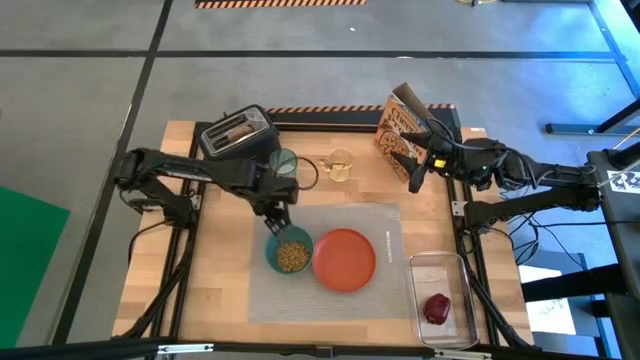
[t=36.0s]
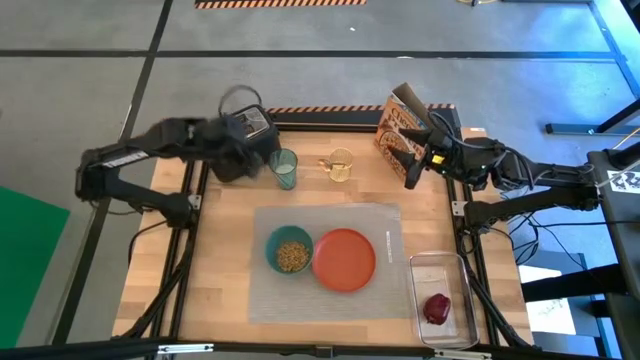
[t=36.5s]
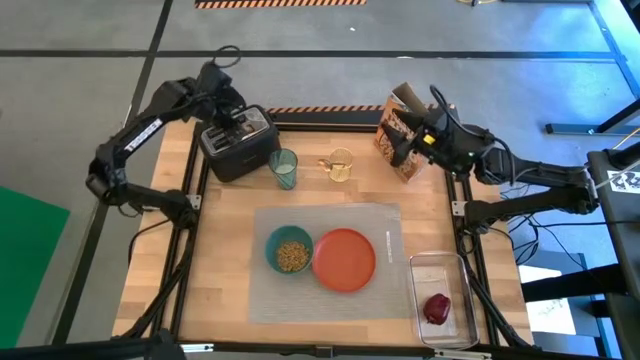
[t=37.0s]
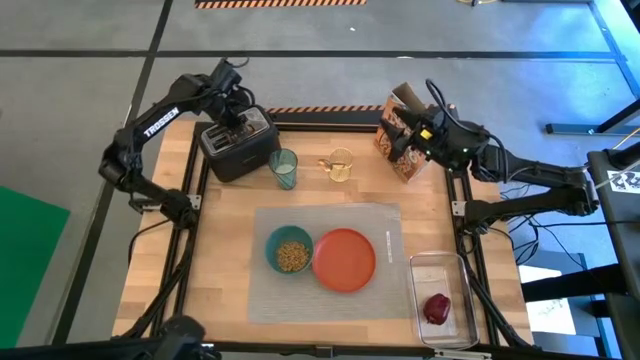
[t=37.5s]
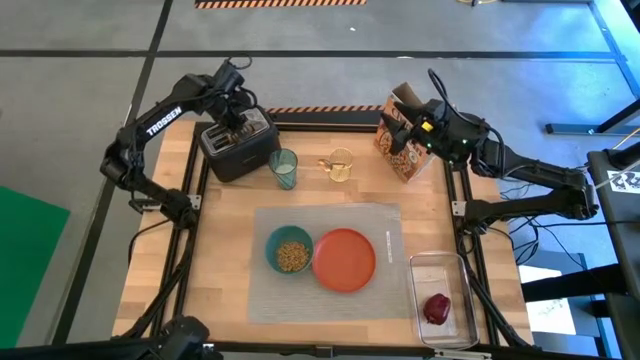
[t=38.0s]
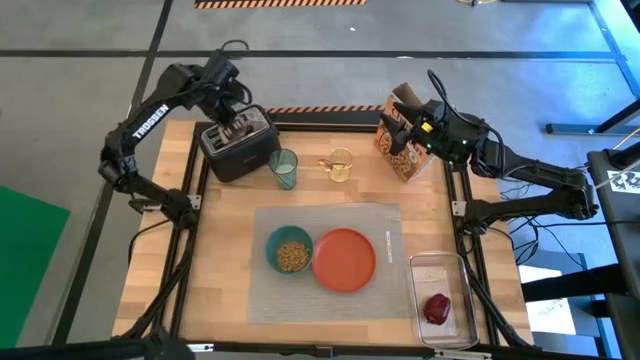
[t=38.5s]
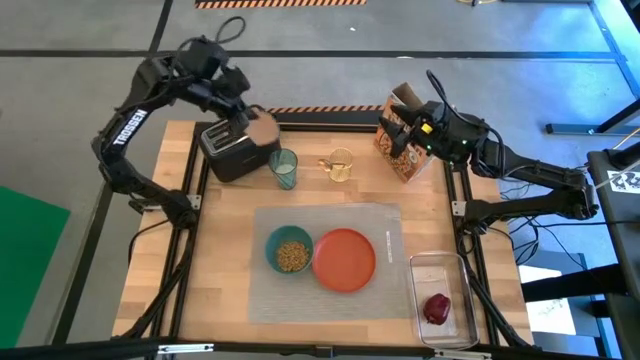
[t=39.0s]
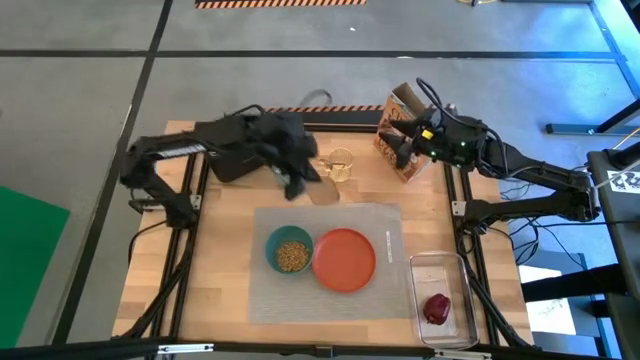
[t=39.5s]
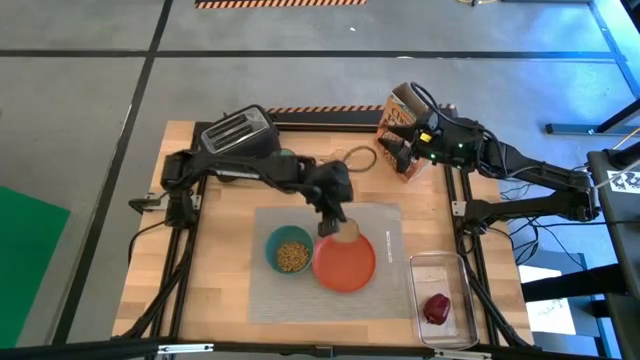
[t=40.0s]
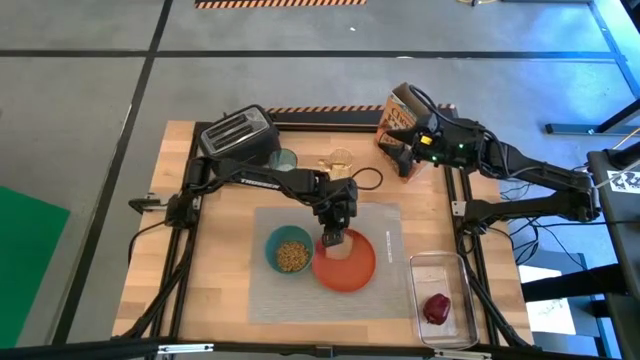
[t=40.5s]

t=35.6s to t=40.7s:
Task: Arrange a breakfast setting
Put the bread on the orange plate

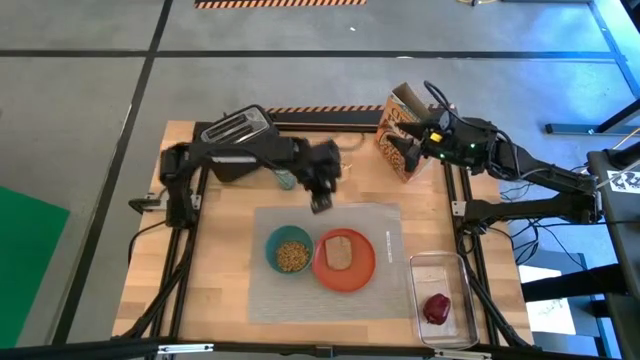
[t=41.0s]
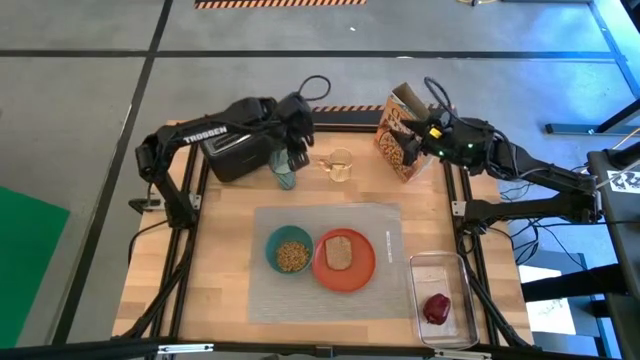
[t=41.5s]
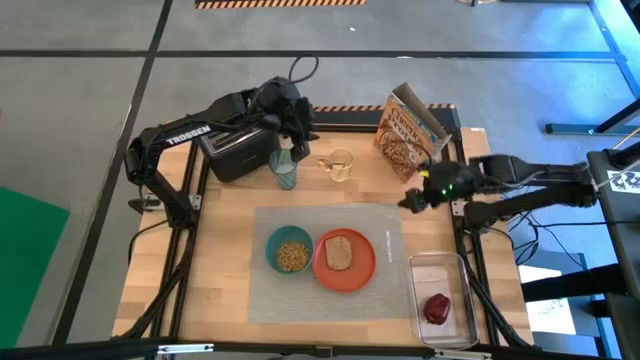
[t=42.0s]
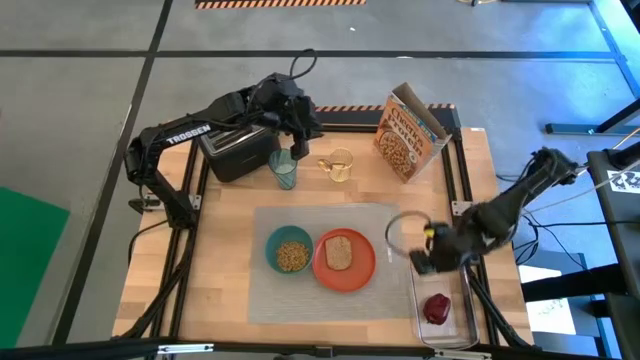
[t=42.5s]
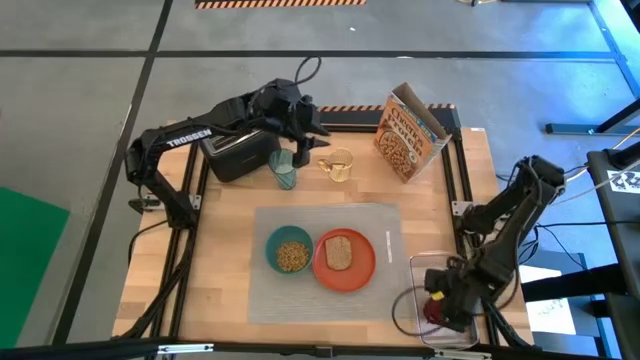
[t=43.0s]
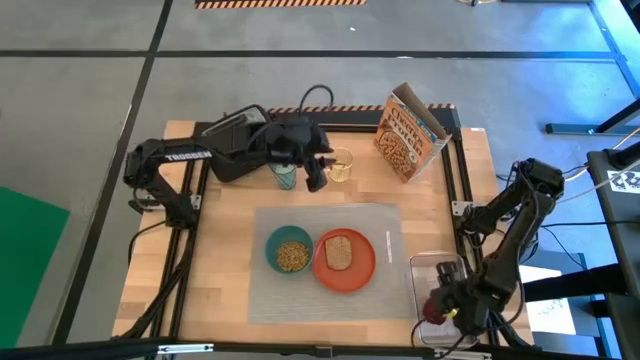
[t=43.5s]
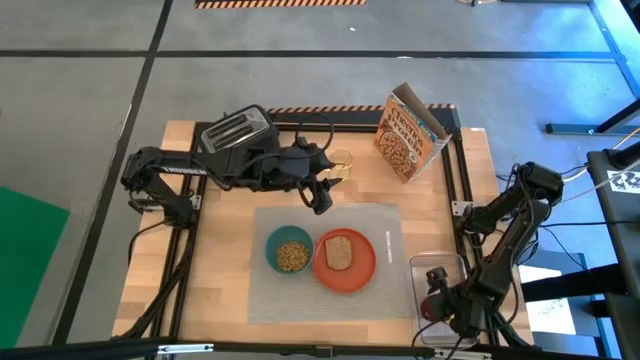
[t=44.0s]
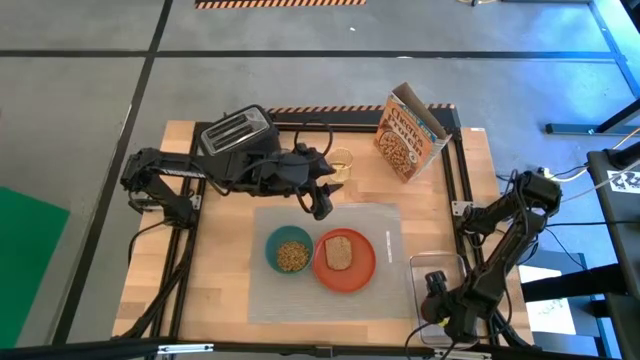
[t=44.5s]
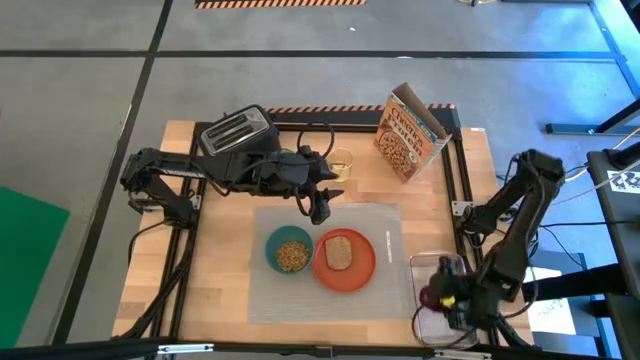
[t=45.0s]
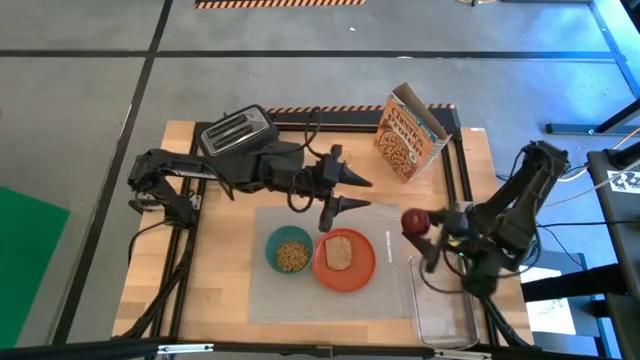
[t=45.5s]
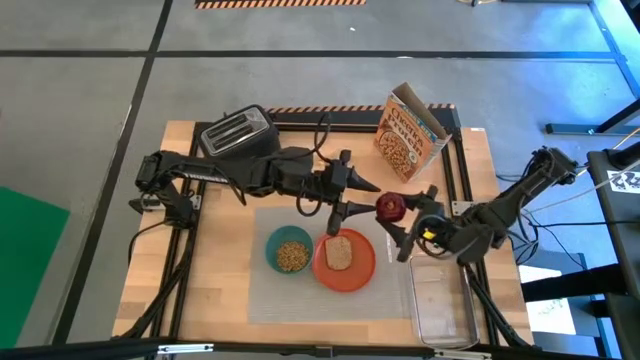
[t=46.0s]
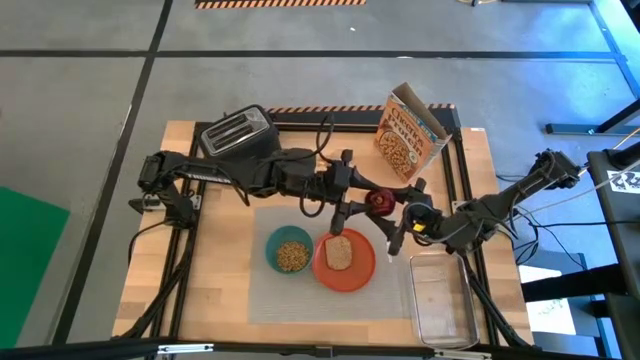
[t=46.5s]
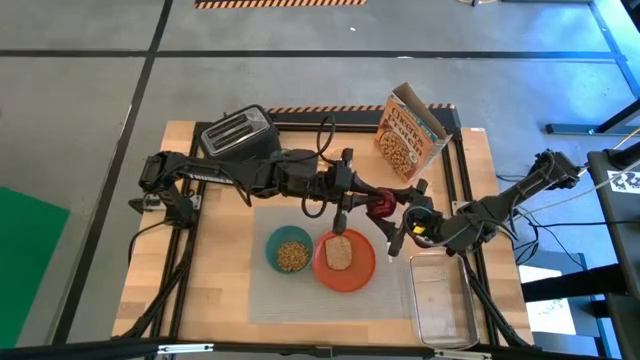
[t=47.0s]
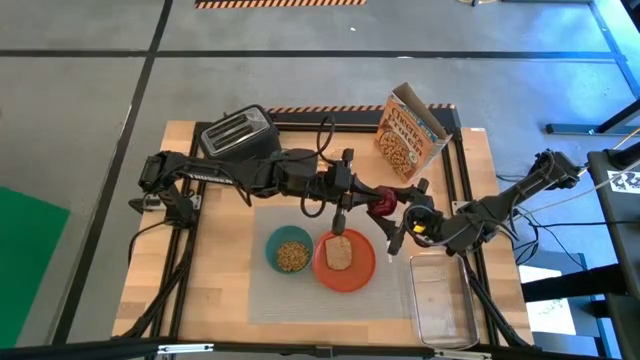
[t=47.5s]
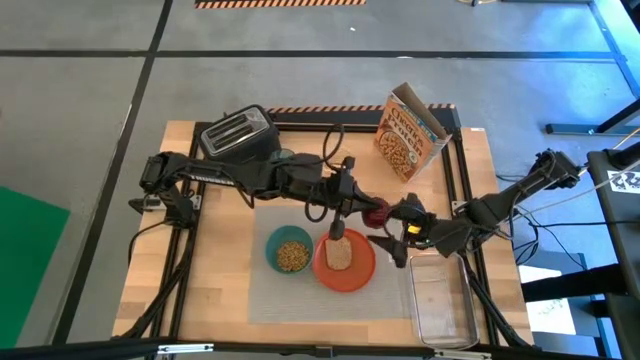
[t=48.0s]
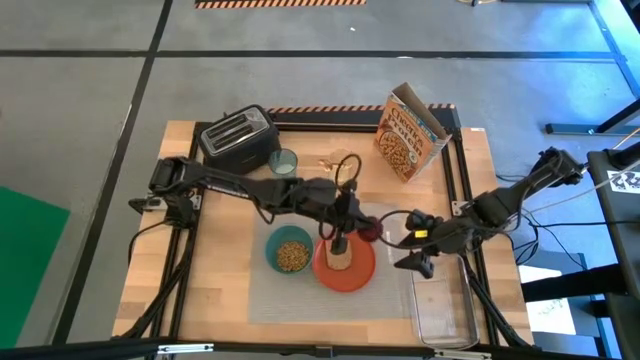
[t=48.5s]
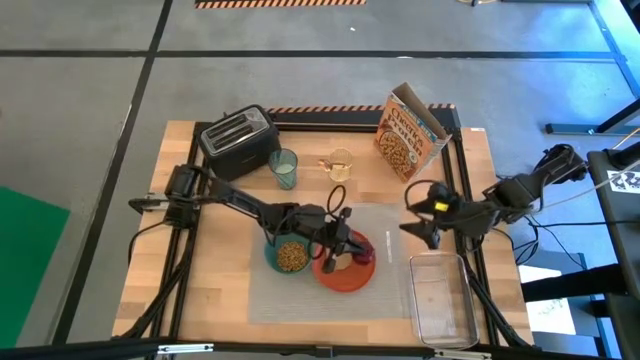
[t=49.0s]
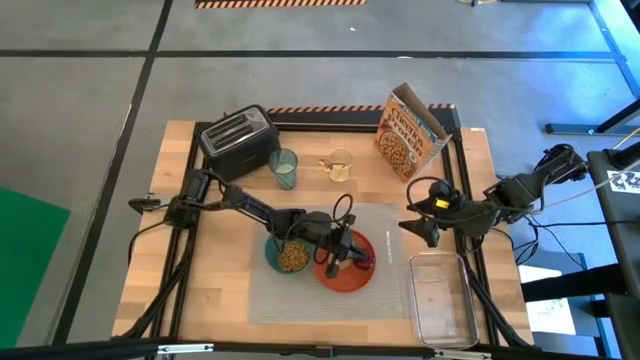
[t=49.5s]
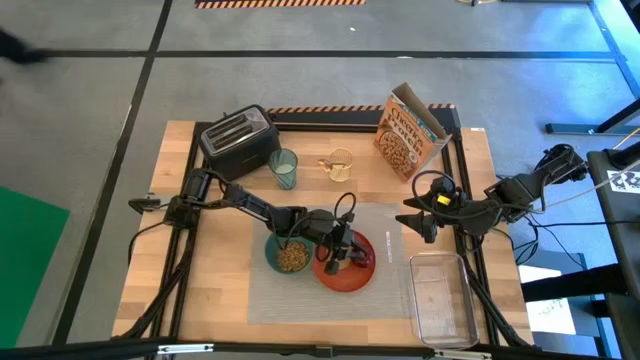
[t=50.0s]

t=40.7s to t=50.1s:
Put the red apple on the orange plate to the right of the bread

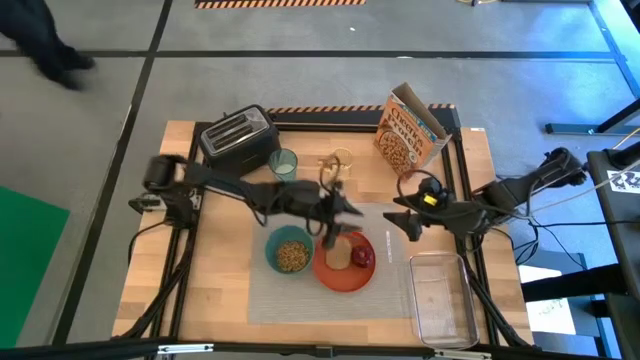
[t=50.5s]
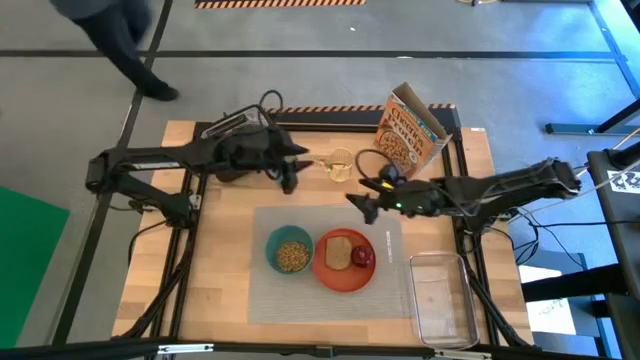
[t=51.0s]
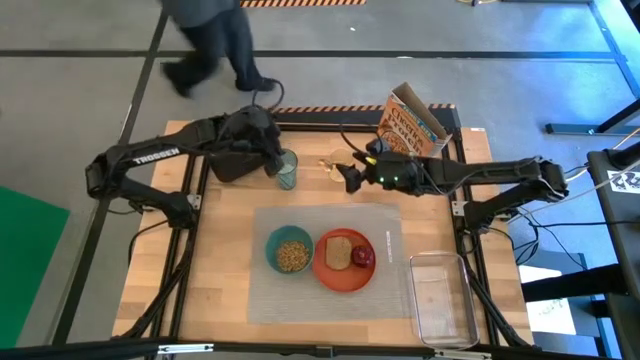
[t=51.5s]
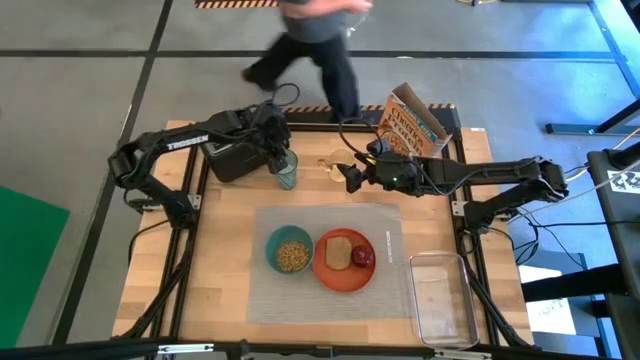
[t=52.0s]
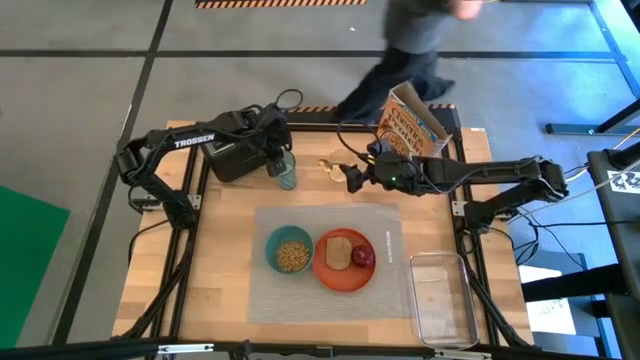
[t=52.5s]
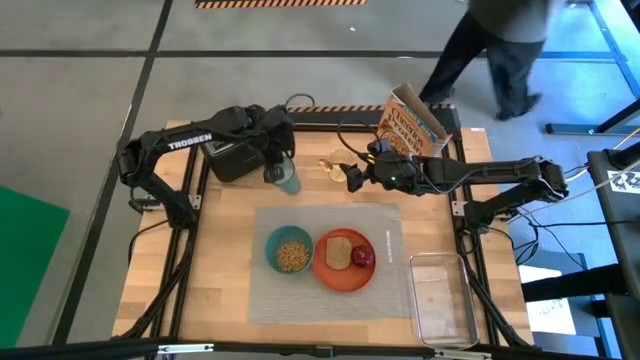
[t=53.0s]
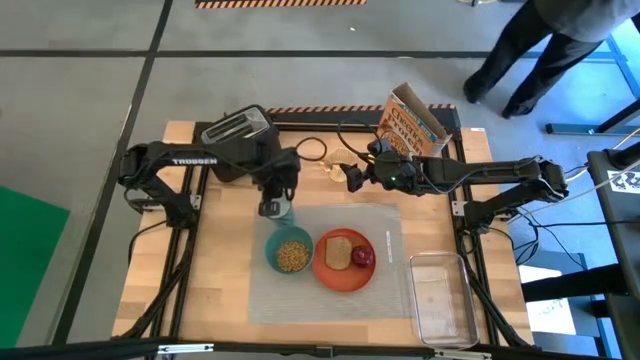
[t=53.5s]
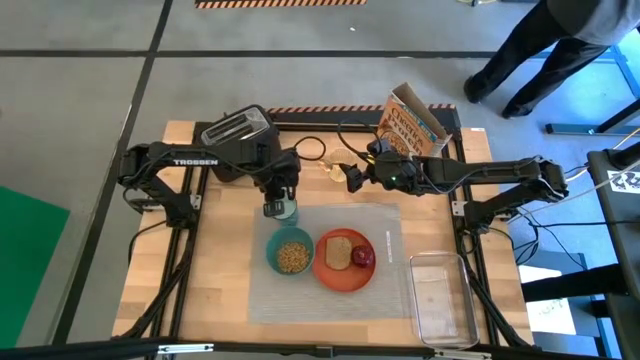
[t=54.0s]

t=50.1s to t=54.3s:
Put the blue glass above the blue bowl

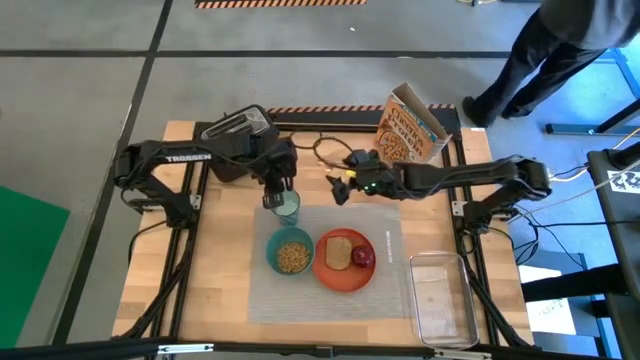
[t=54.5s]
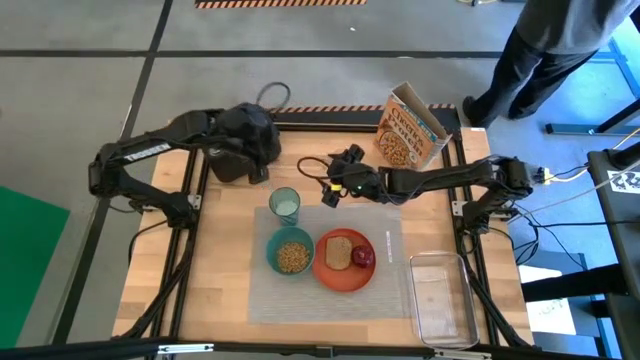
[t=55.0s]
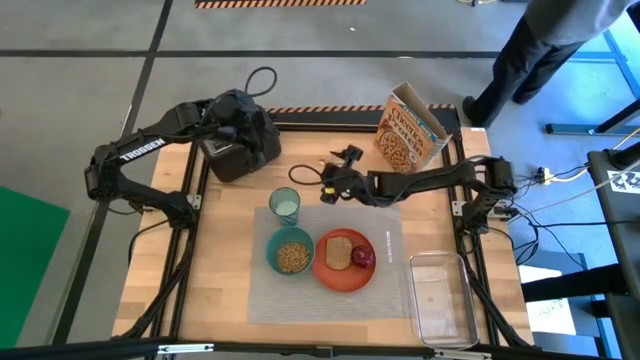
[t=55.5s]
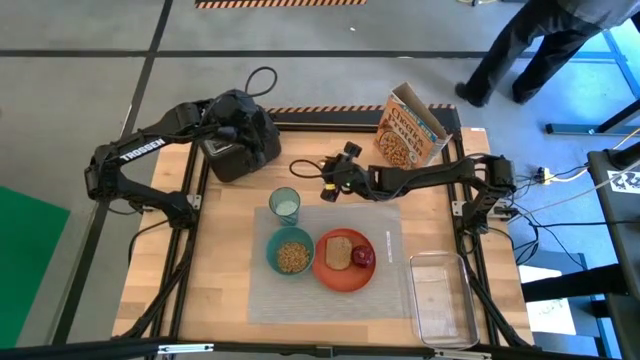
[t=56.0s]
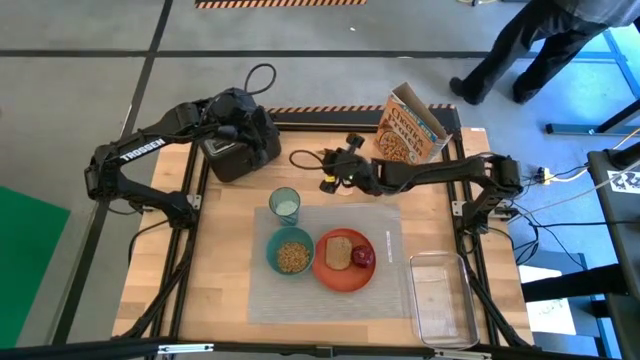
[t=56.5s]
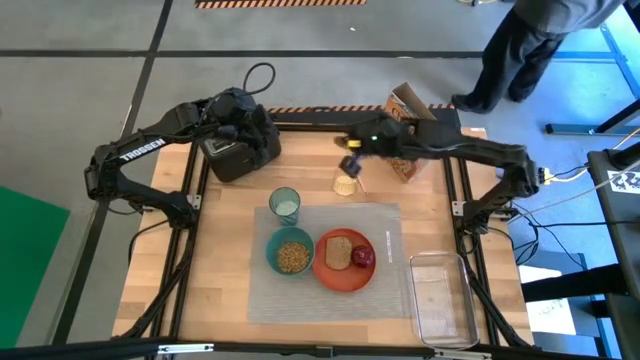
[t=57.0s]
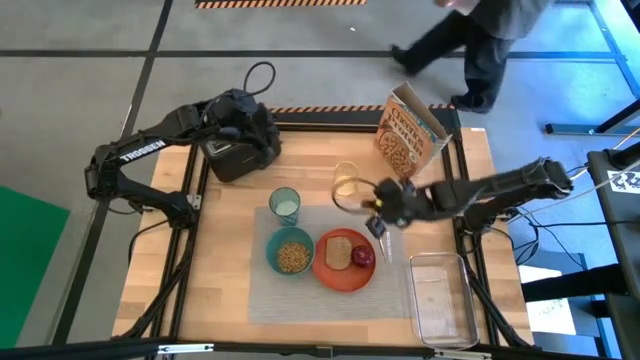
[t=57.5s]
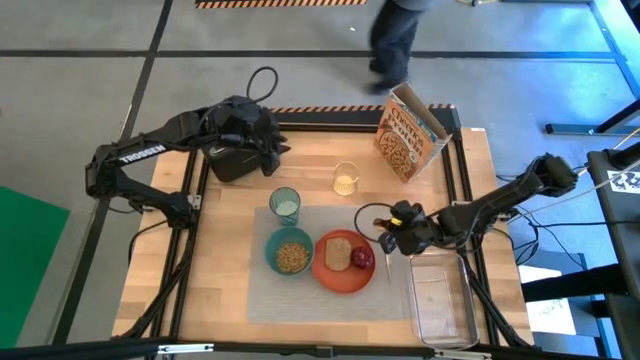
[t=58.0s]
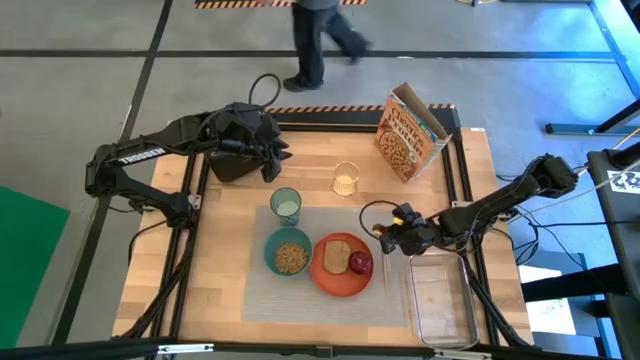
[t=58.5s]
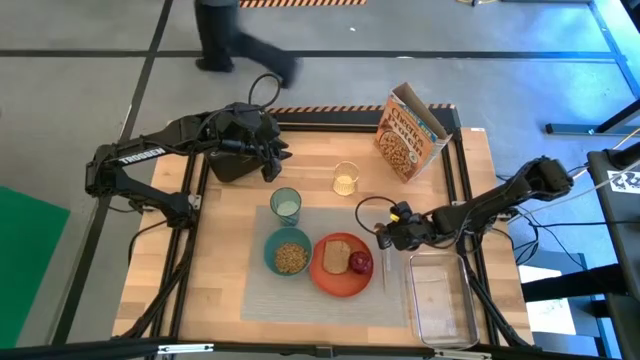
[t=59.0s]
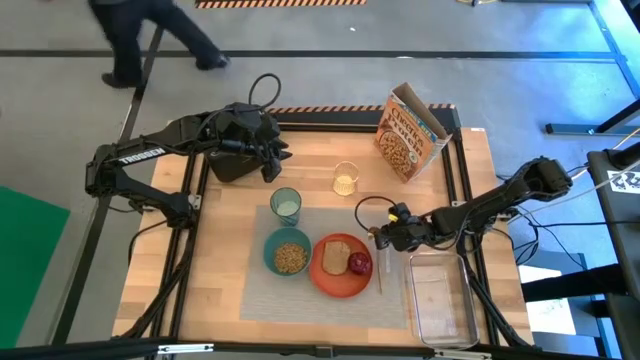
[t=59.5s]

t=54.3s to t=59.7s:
Put the gold spoon to the right of the orange plate
